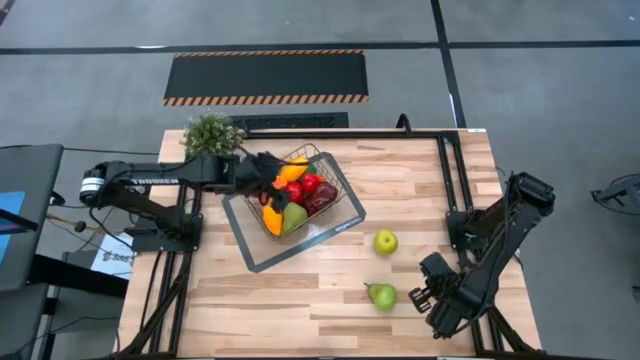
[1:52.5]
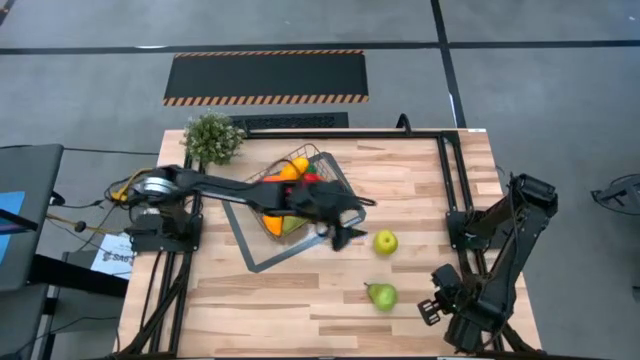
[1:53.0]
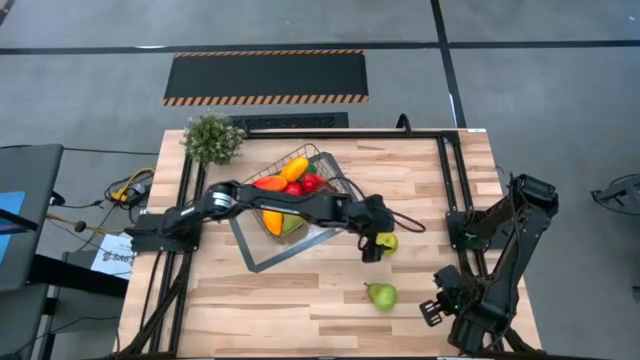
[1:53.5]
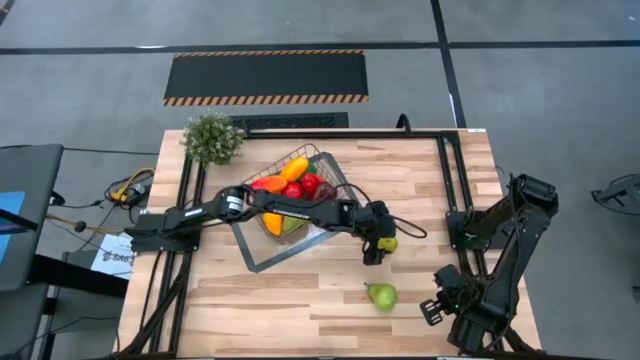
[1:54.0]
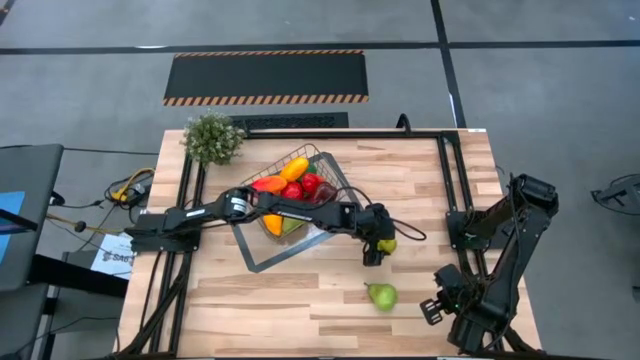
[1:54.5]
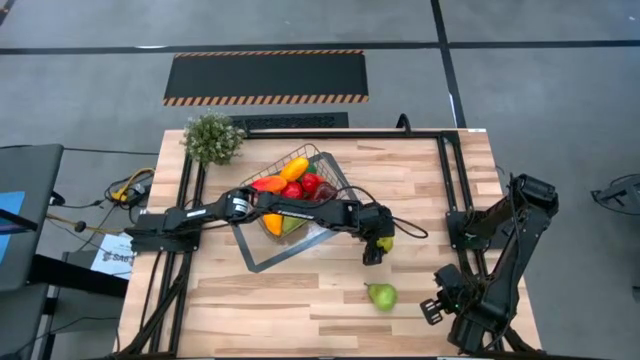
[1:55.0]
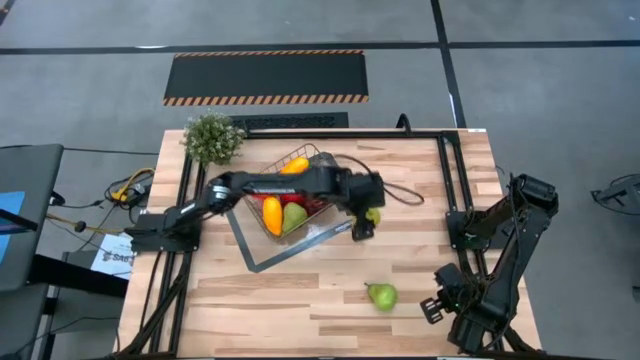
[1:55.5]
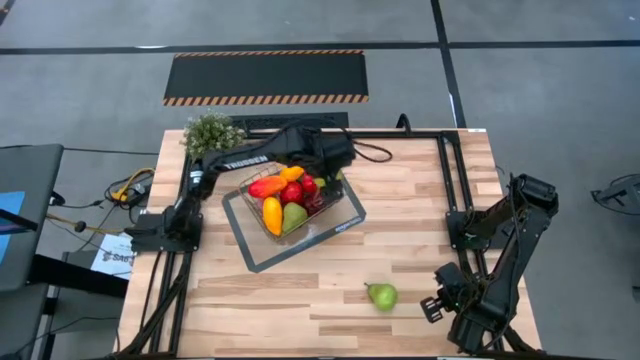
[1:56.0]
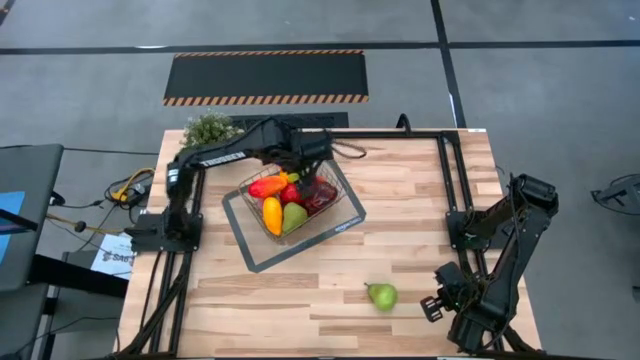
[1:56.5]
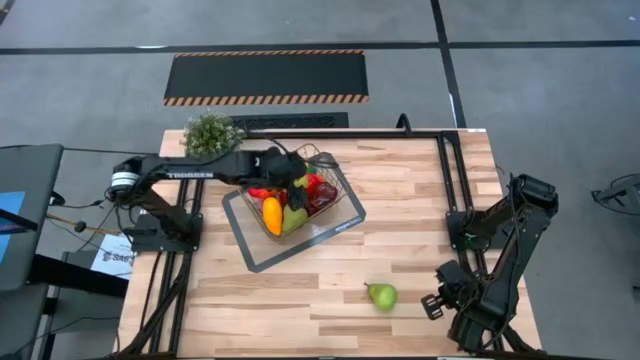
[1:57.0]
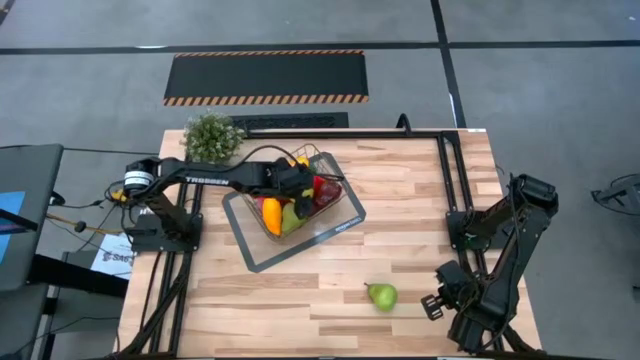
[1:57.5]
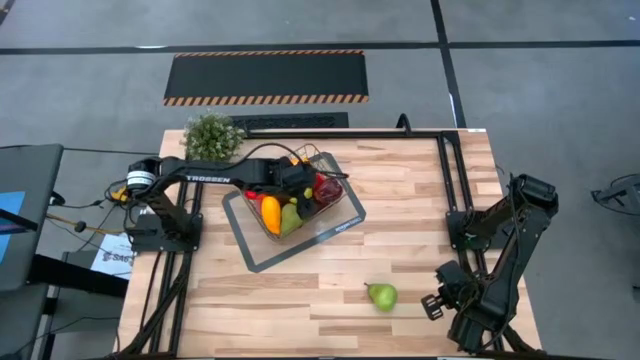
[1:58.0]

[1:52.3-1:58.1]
Task: Build produce basket
Put the green apple into the gold wire basket

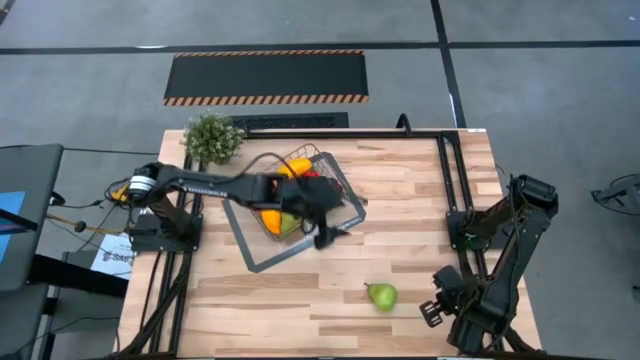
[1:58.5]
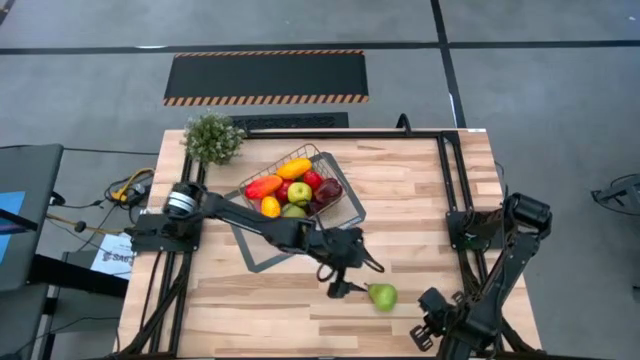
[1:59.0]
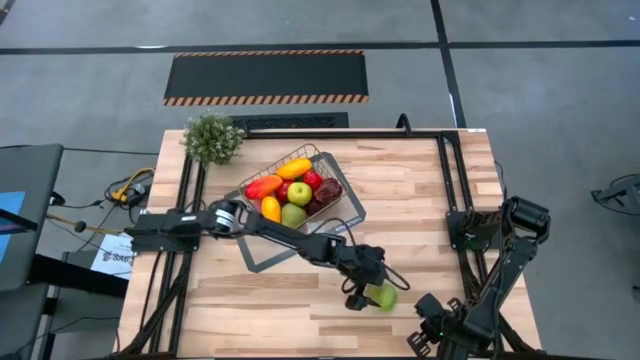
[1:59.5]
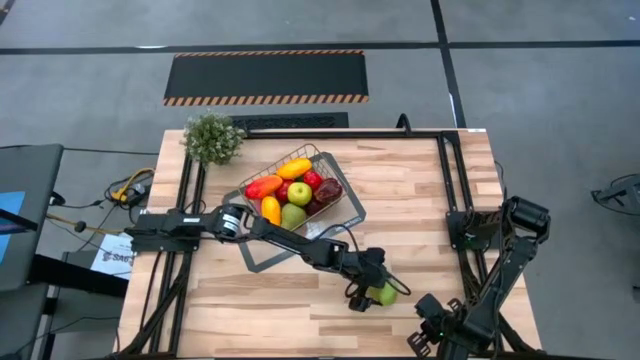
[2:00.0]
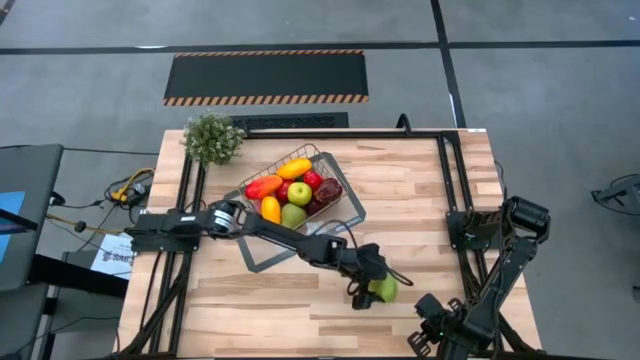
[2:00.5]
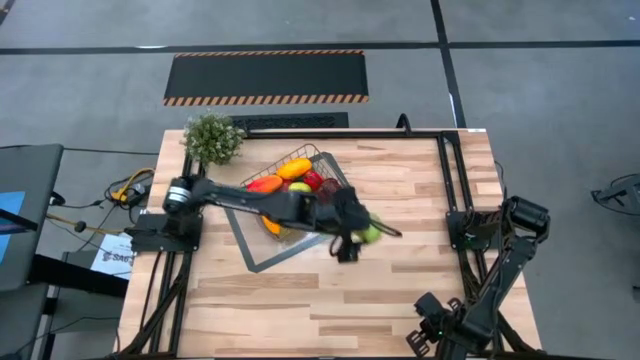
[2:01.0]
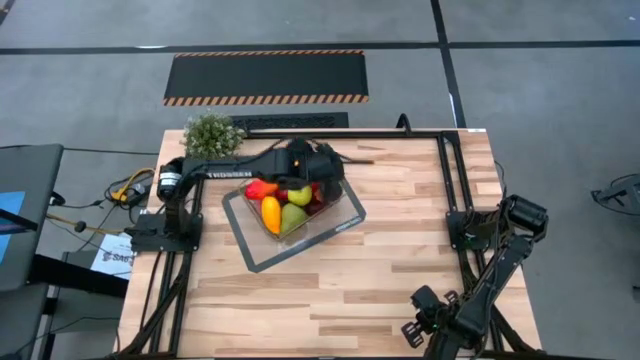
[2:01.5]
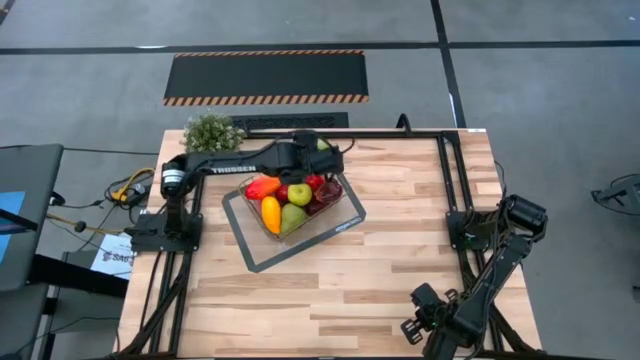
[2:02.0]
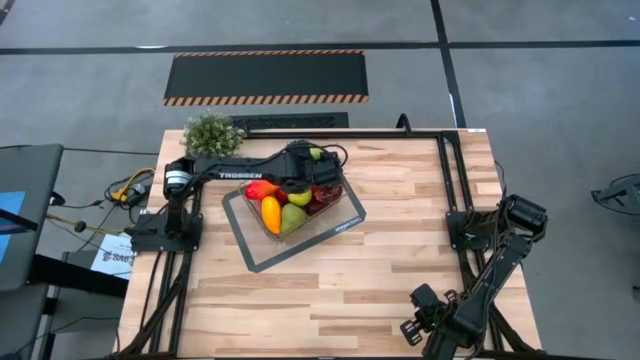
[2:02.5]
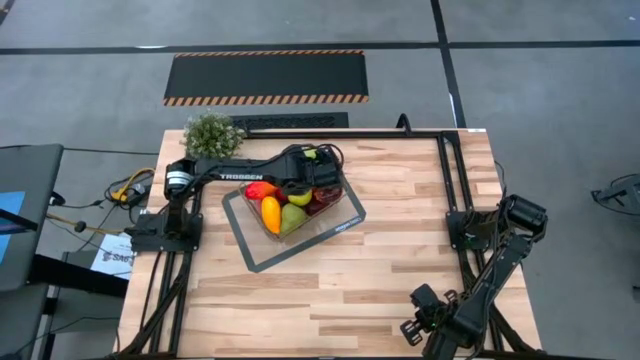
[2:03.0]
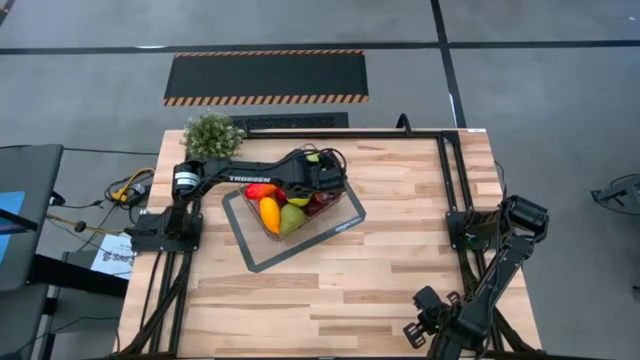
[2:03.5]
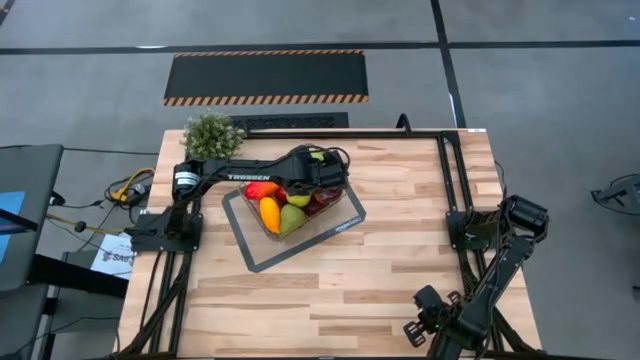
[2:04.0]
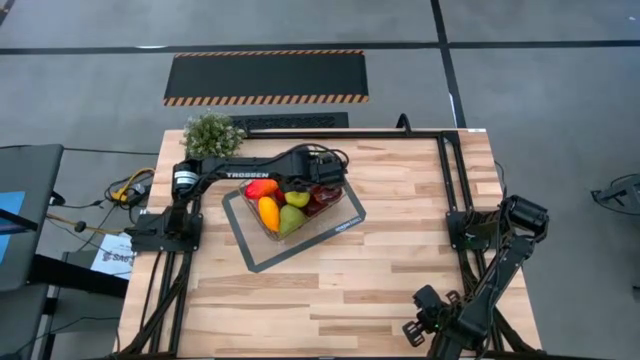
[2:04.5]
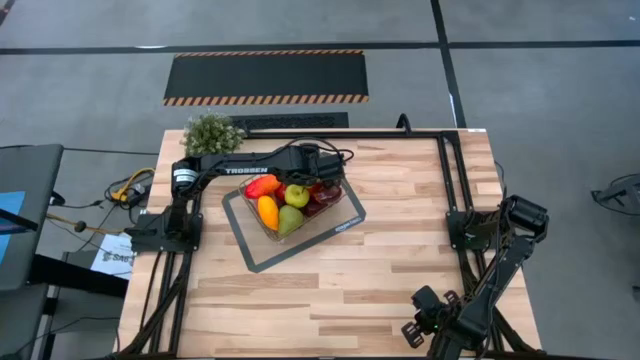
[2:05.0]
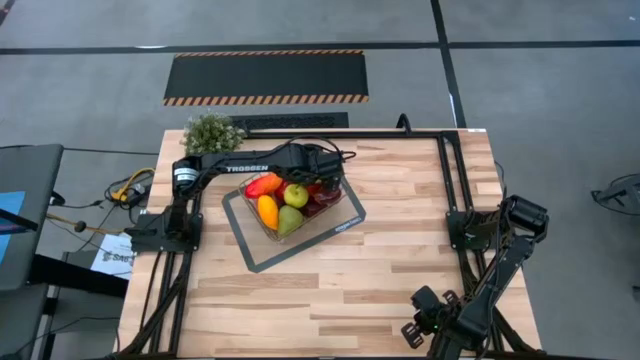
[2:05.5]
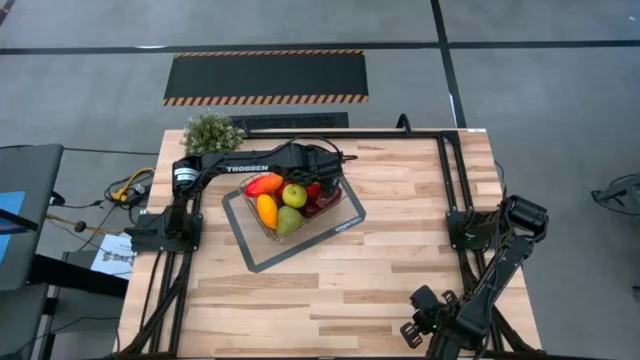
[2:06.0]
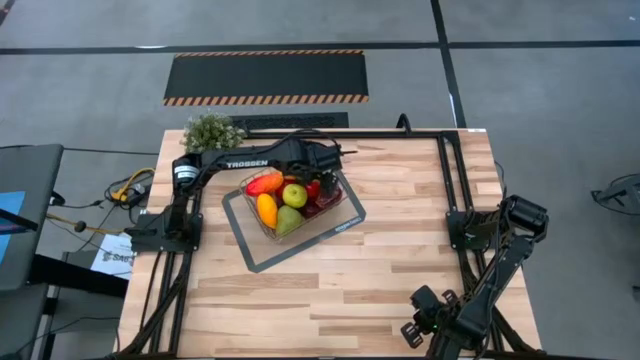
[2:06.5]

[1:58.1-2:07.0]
Put the green pear into the gold wire basket

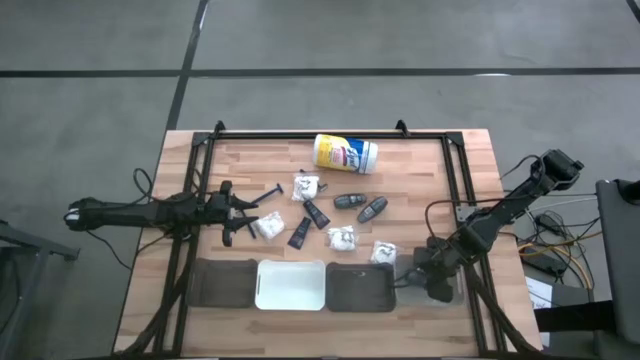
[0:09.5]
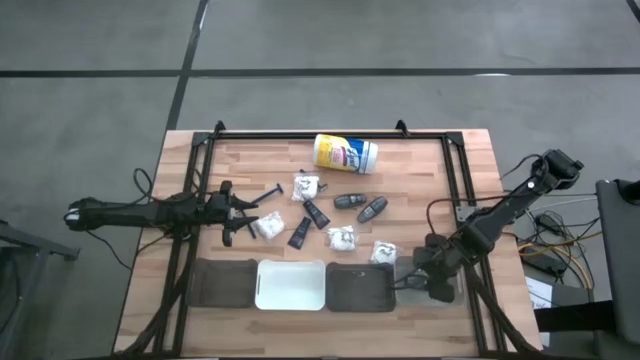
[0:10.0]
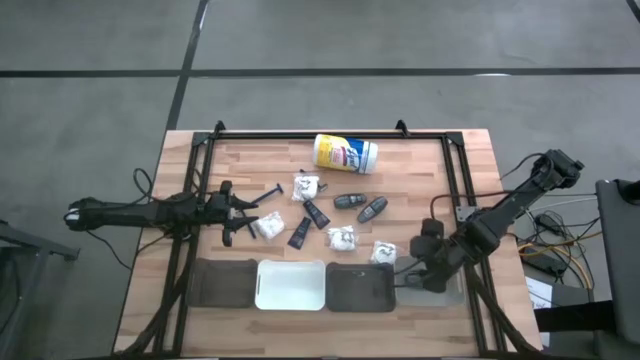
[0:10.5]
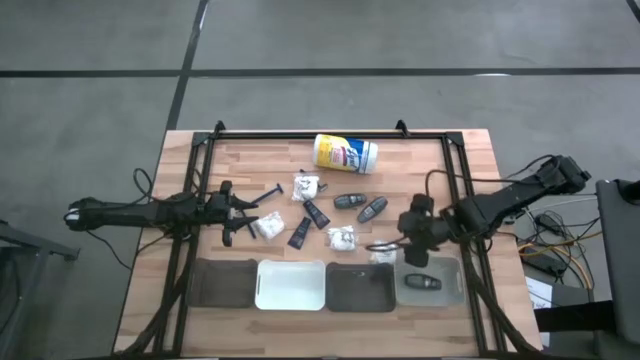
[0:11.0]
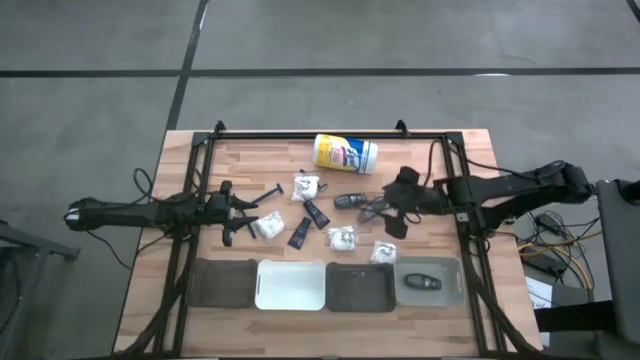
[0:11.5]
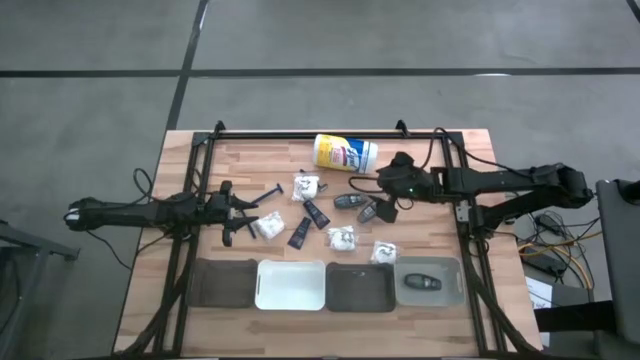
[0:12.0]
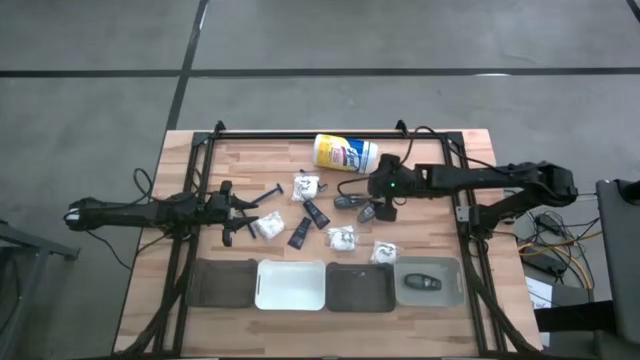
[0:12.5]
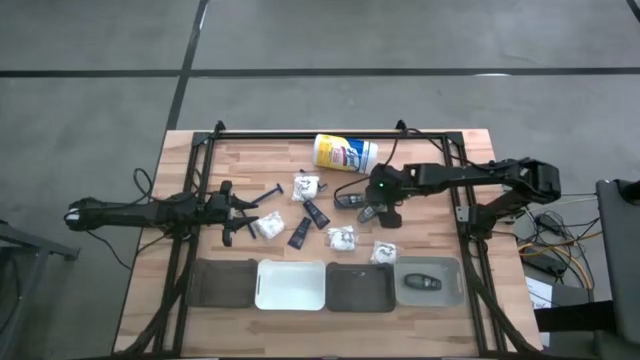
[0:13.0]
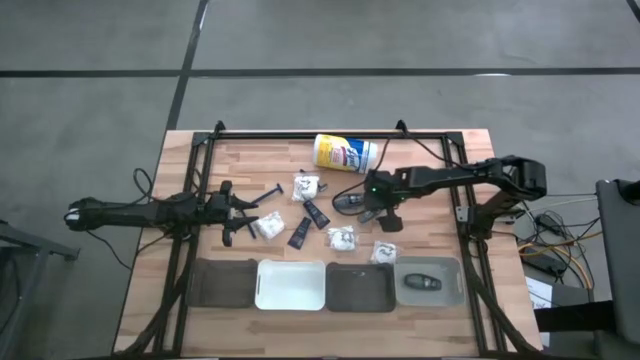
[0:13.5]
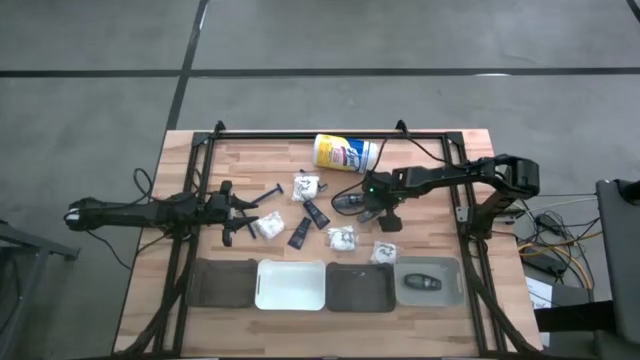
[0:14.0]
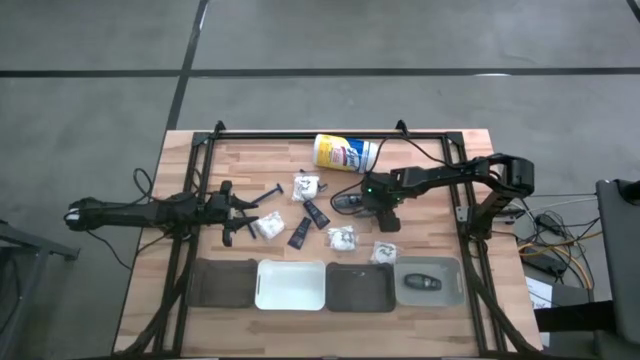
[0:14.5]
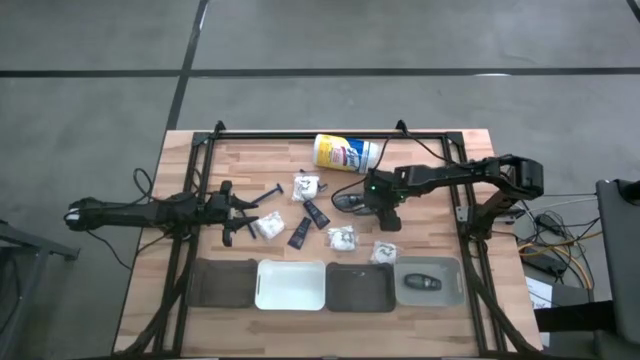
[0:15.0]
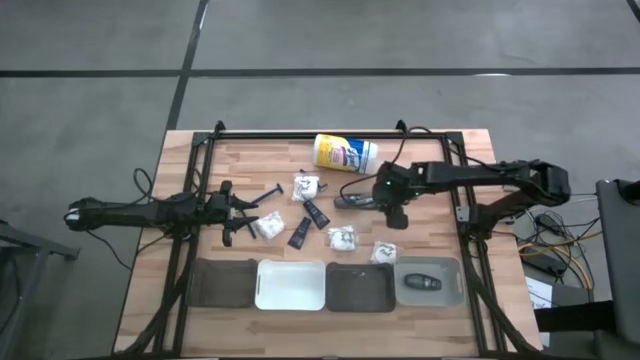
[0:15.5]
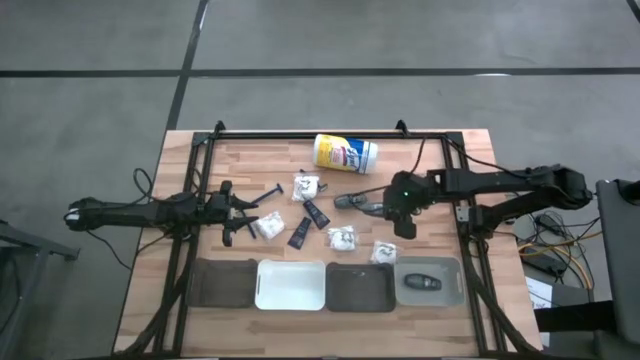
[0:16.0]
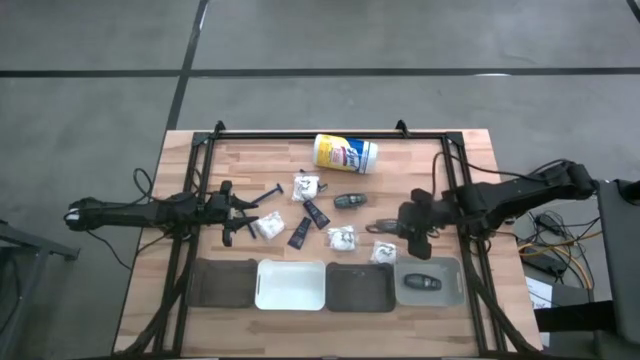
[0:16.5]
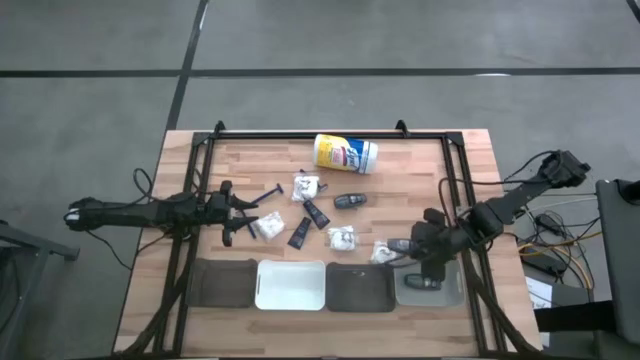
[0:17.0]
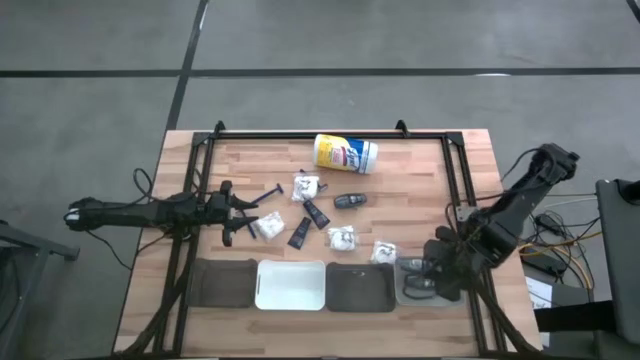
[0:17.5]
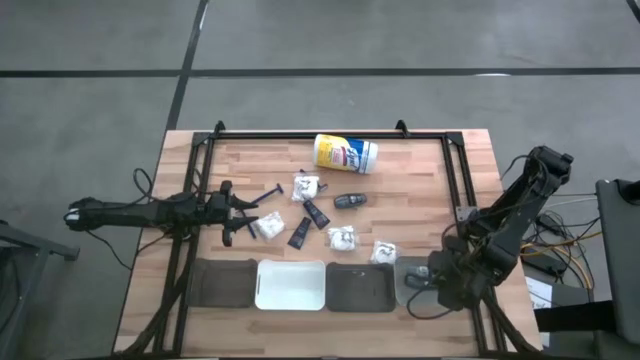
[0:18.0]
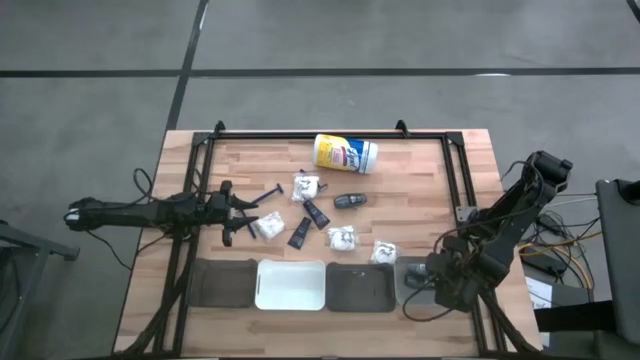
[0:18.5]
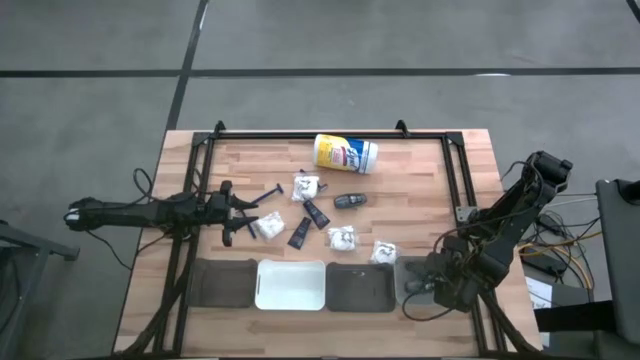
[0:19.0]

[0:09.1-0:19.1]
Task: Pick & Place Travel size toiletries
Put the gray deodorant into the gray bin
